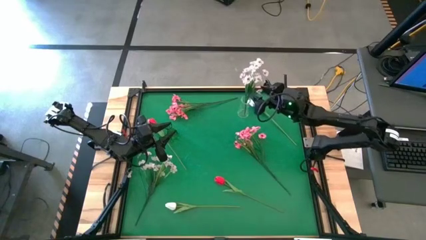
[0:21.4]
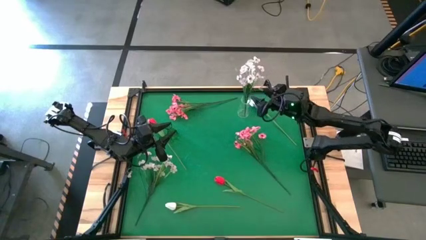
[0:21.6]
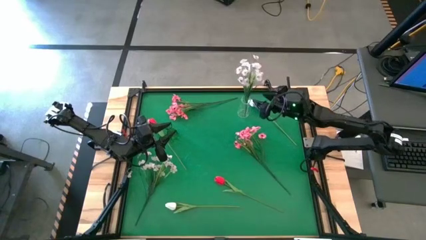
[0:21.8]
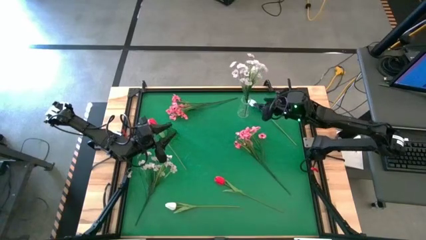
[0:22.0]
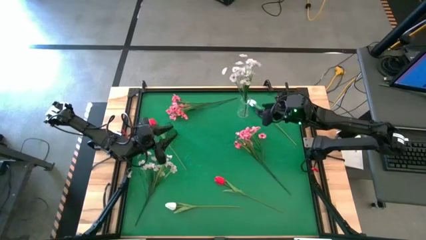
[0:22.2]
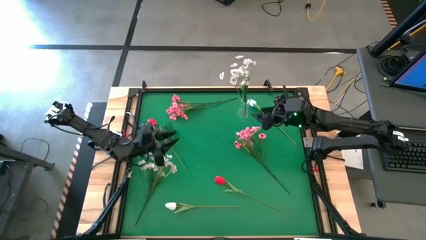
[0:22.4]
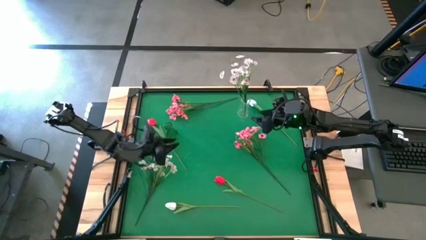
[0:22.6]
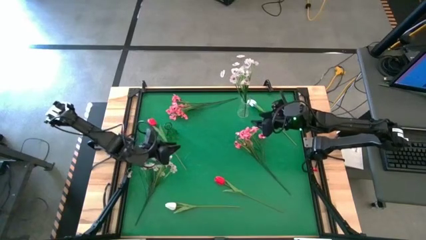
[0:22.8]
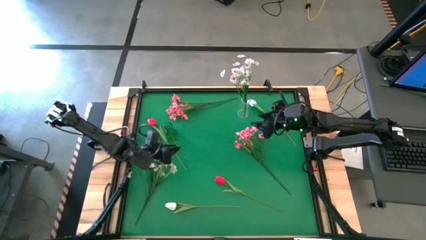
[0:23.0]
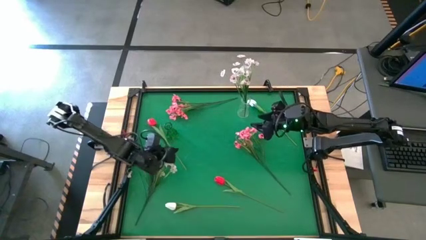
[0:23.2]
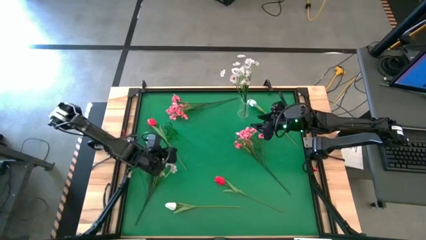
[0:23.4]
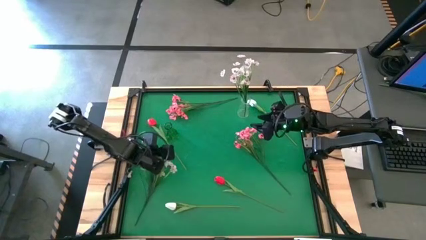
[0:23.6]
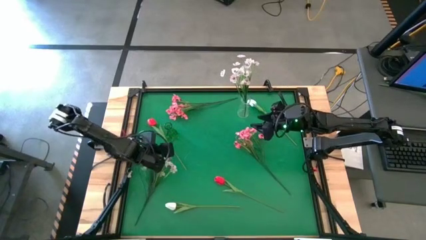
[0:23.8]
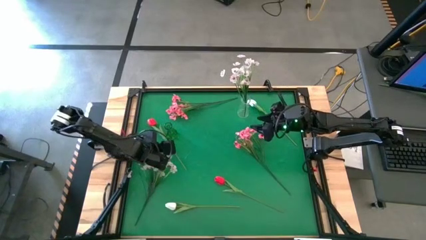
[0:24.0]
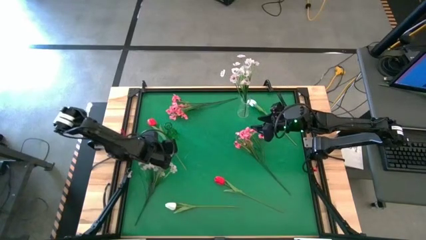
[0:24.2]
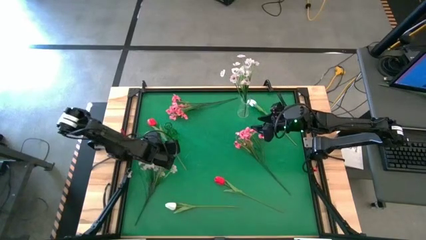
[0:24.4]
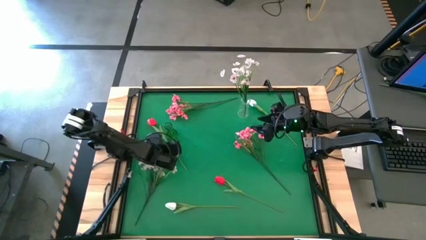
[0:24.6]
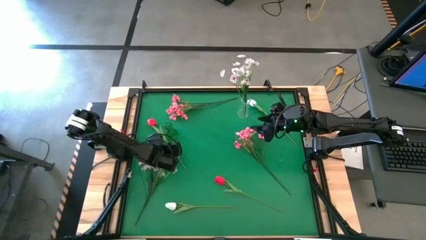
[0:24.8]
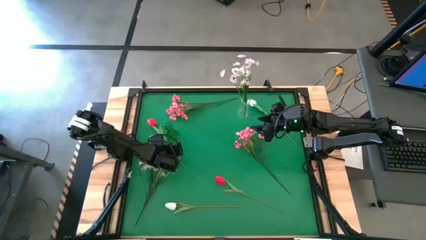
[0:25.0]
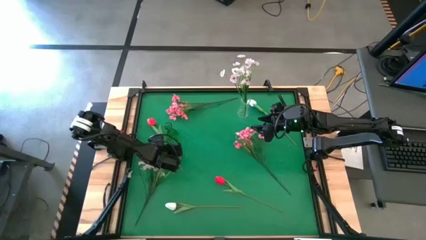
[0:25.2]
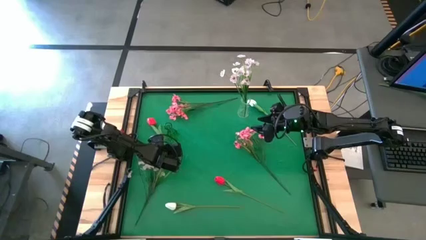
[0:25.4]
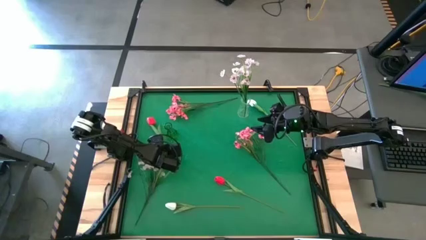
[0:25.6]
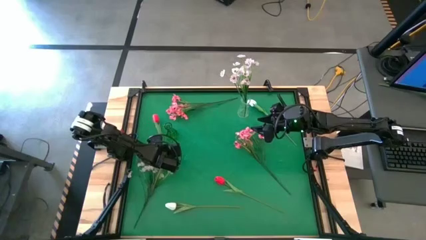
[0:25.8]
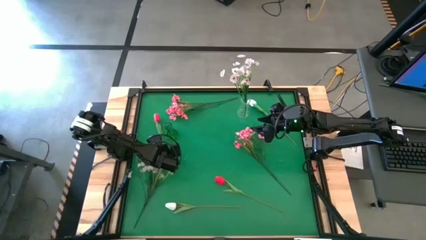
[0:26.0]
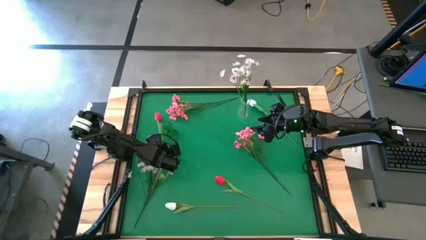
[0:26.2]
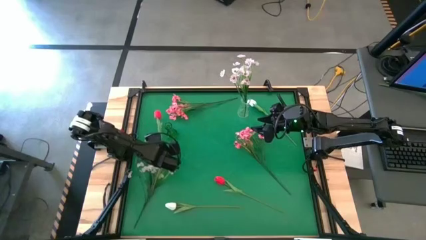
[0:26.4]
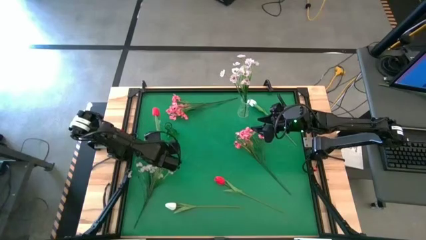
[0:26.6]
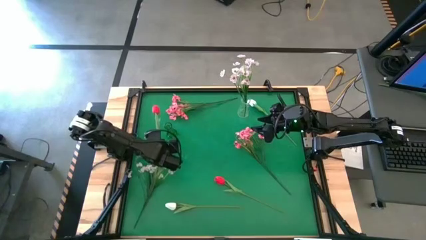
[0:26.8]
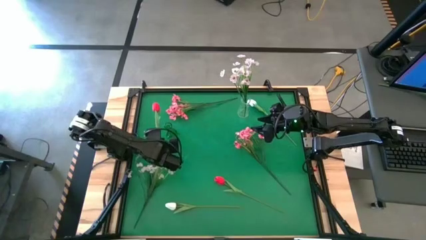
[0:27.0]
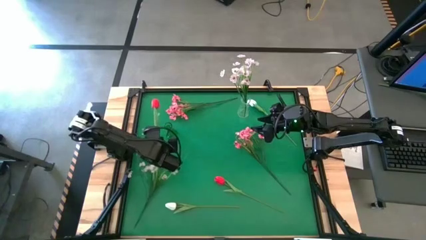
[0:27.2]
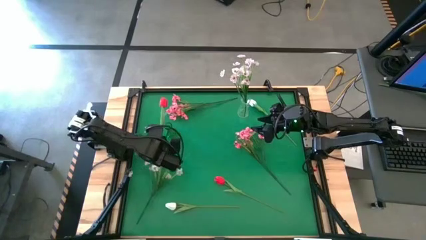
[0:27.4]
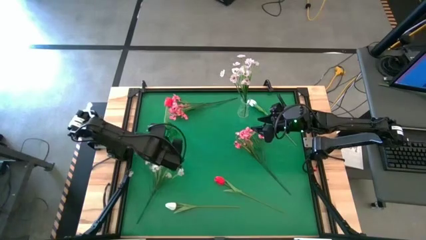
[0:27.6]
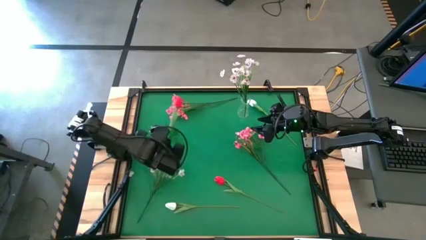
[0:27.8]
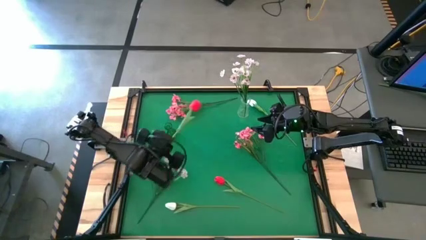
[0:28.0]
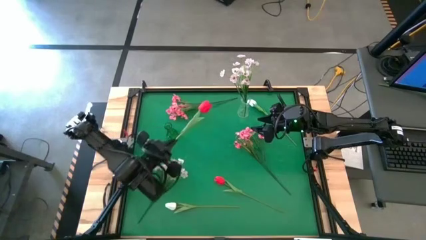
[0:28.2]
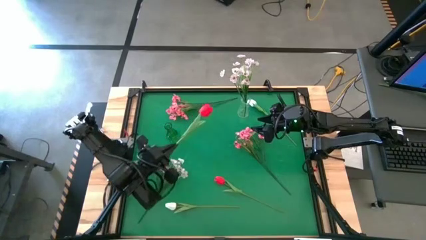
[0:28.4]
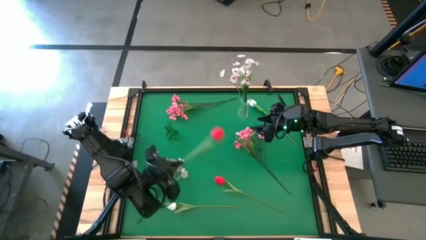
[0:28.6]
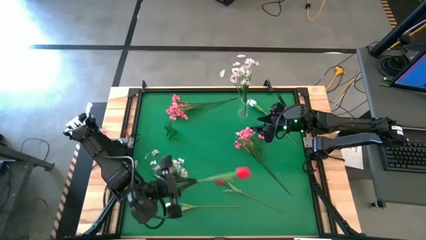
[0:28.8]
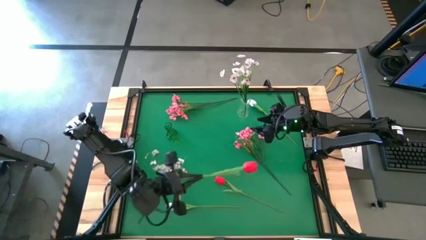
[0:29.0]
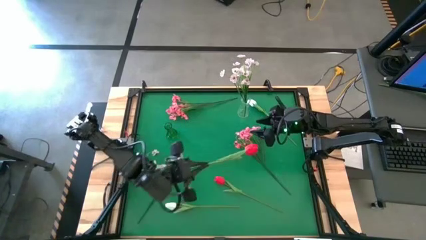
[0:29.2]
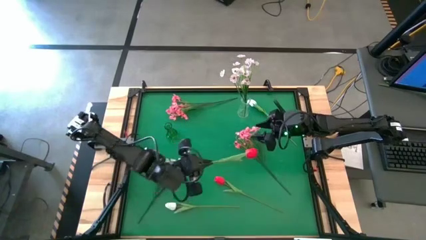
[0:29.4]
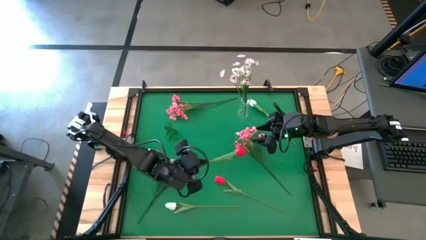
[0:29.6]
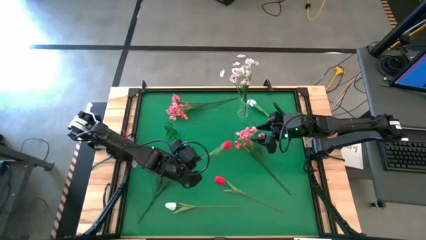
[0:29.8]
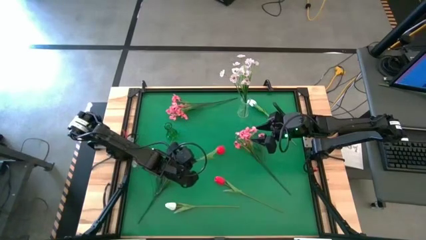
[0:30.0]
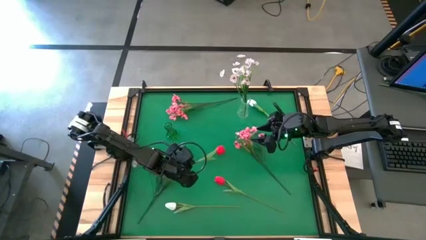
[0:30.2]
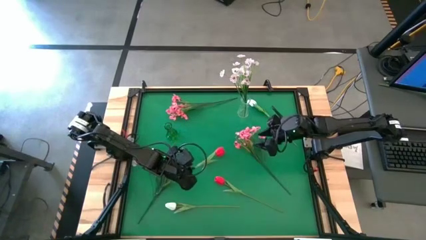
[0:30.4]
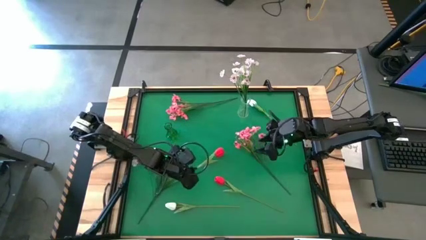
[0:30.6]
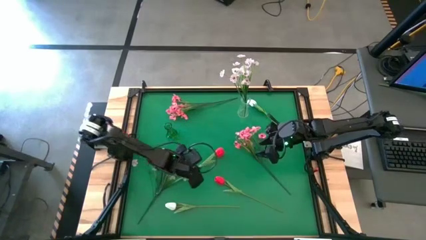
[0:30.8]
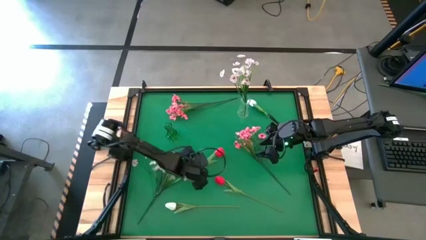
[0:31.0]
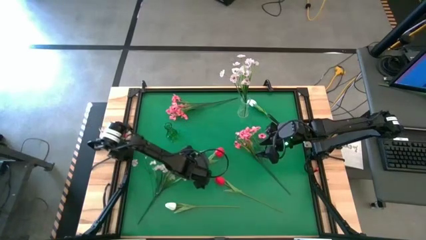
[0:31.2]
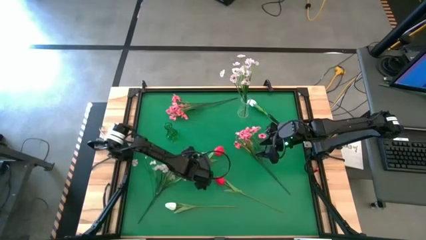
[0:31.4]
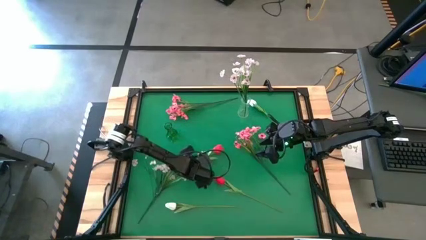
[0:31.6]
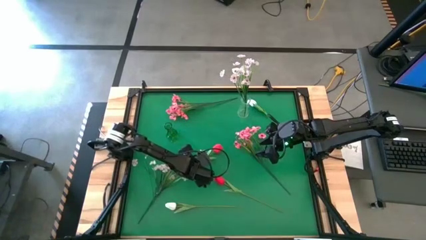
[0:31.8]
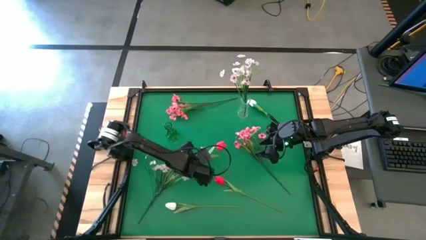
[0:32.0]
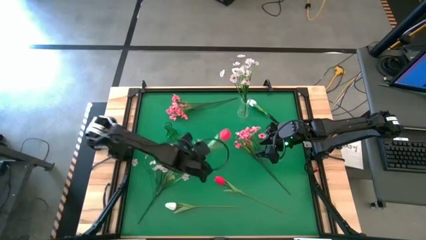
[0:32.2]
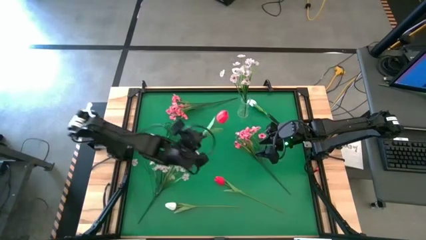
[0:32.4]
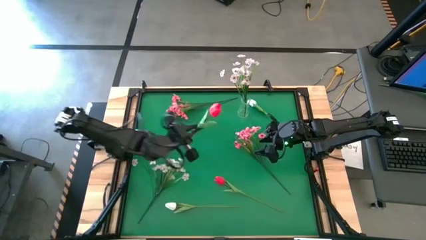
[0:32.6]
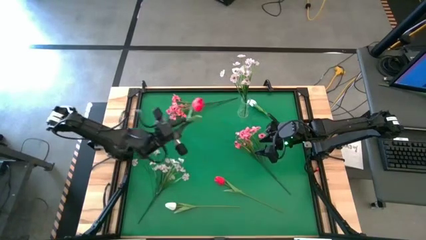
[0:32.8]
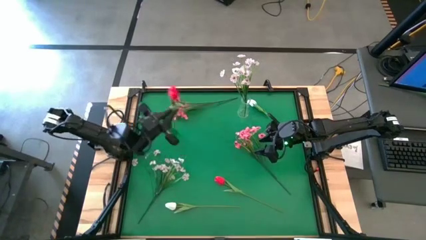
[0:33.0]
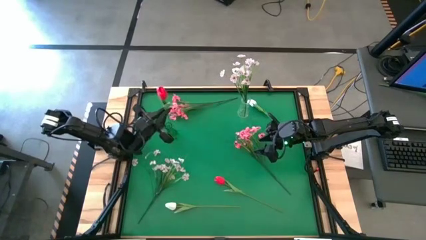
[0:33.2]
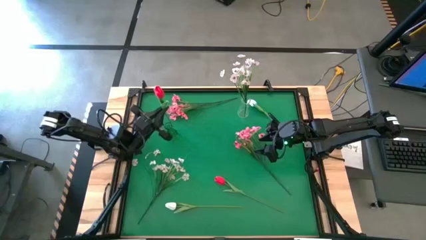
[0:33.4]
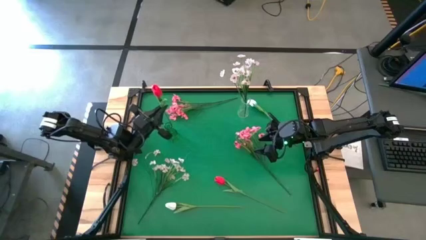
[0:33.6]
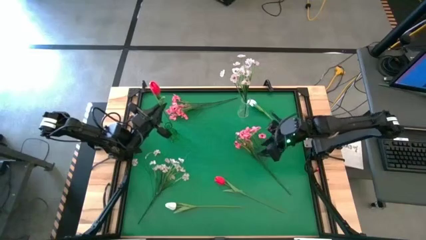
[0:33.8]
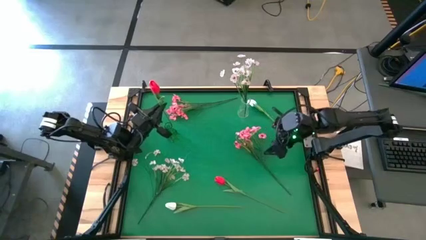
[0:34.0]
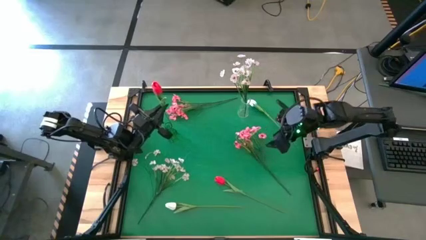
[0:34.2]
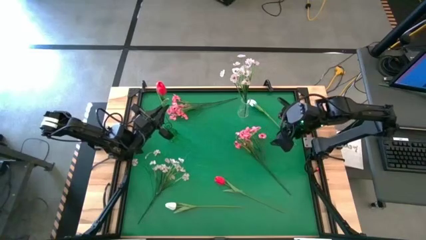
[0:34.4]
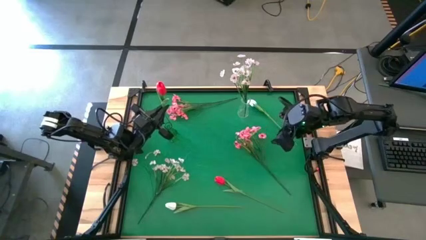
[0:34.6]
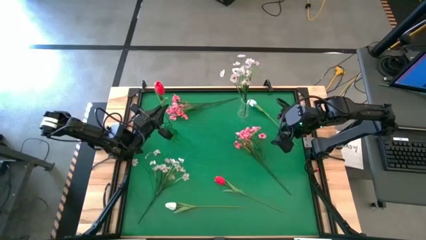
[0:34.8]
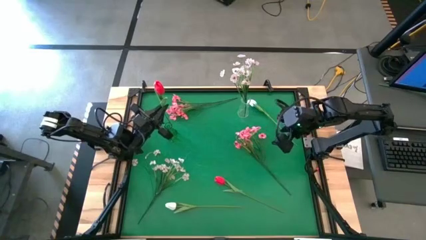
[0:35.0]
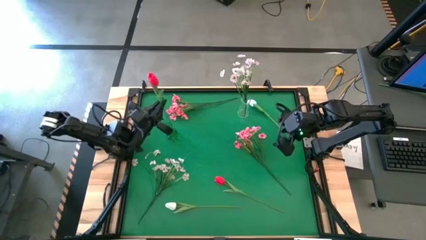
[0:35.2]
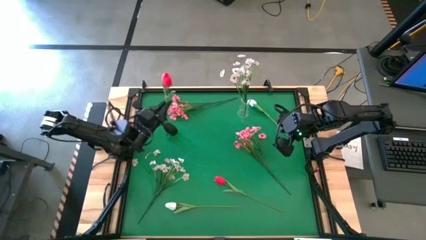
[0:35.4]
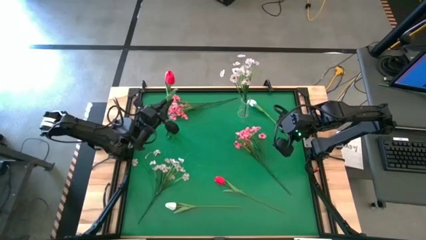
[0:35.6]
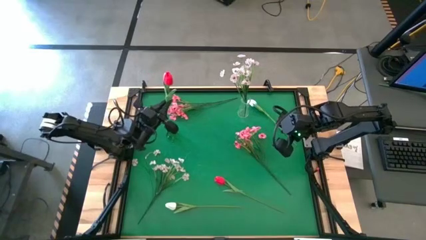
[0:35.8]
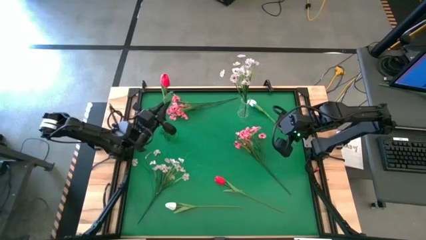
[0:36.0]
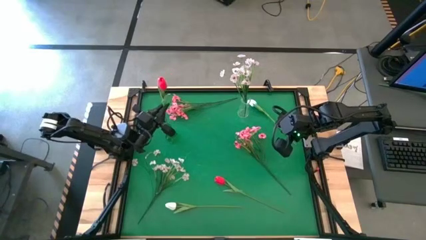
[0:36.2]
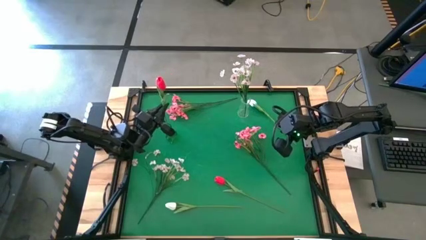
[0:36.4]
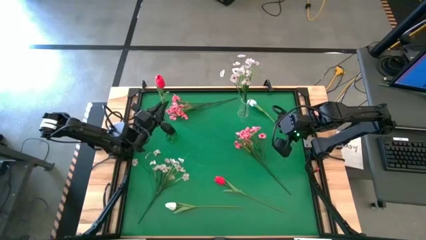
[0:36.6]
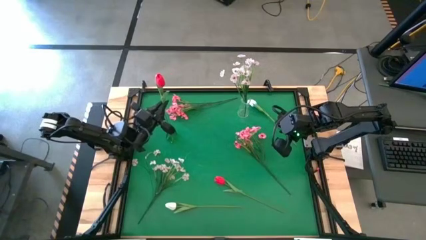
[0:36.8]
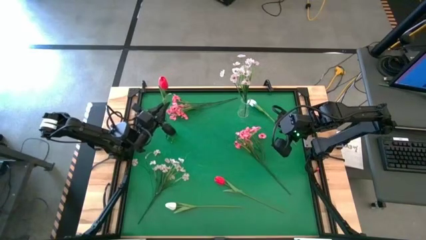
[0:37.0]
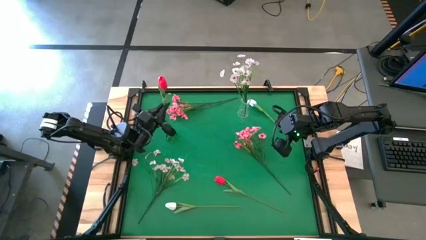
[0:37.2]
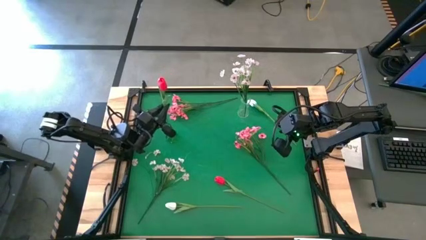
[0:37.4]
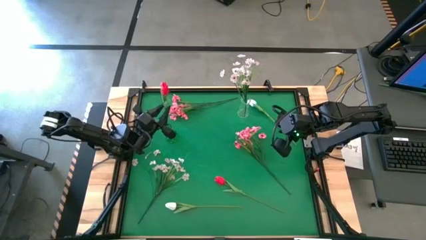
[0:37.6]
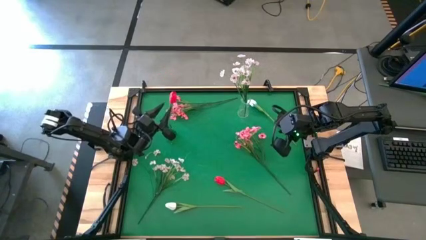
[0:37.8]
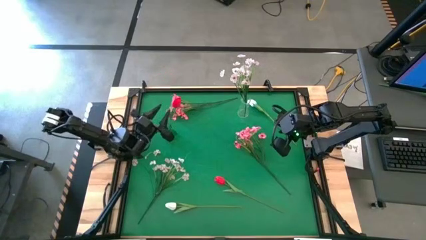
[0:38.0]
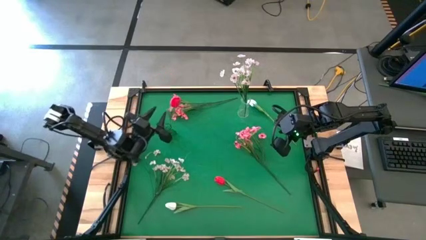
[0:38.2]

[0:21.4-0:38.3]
Task: Sort flowers into vase by color
Put the top red flower into the green vase
